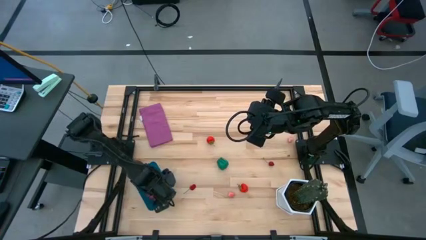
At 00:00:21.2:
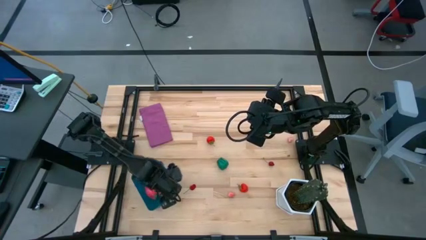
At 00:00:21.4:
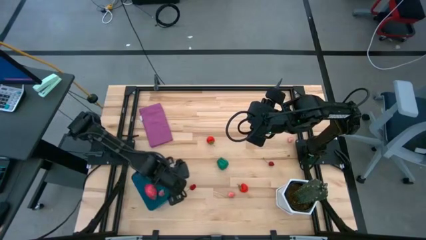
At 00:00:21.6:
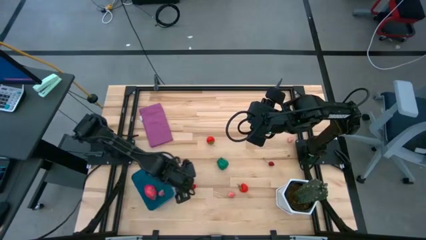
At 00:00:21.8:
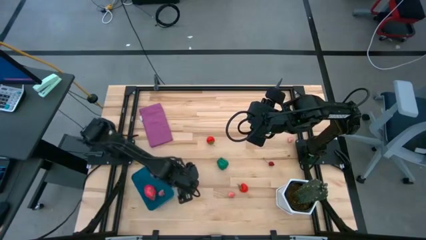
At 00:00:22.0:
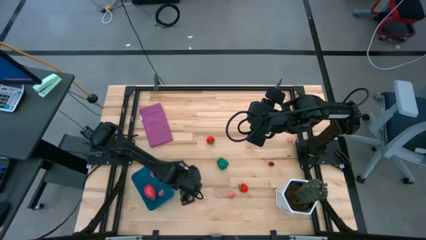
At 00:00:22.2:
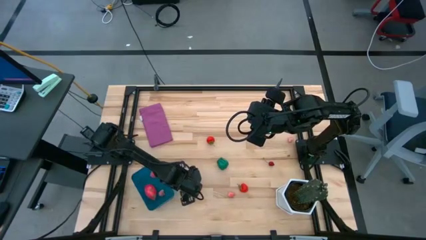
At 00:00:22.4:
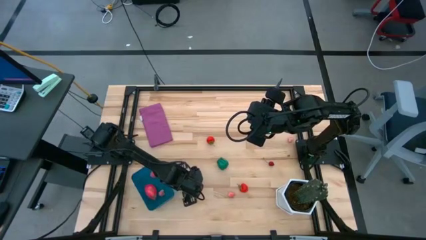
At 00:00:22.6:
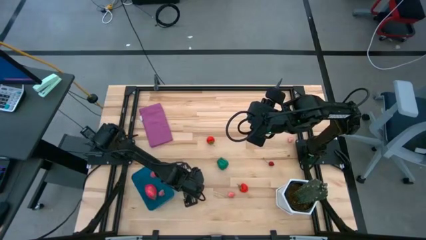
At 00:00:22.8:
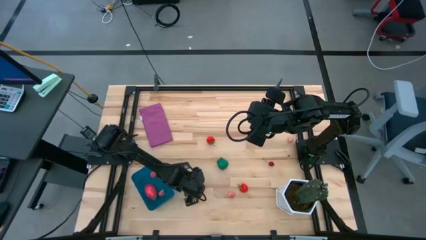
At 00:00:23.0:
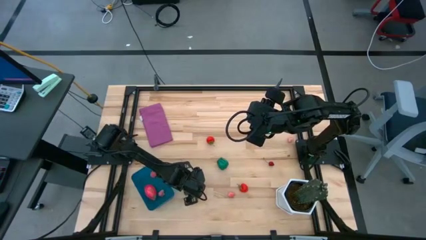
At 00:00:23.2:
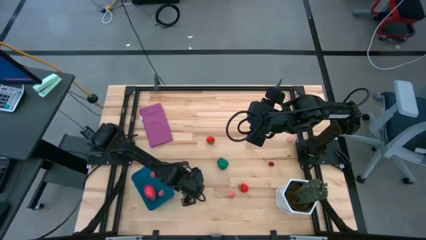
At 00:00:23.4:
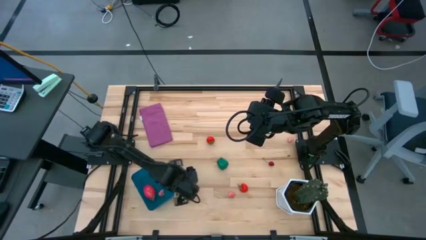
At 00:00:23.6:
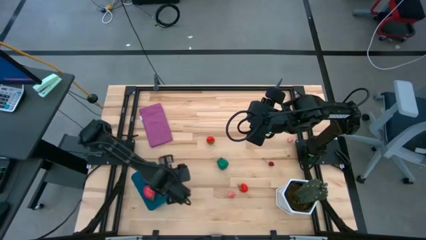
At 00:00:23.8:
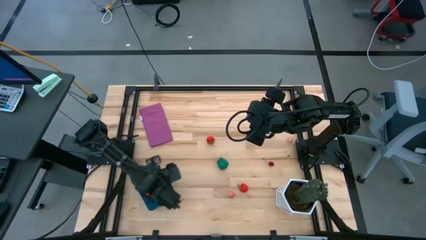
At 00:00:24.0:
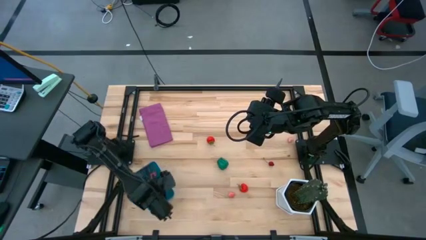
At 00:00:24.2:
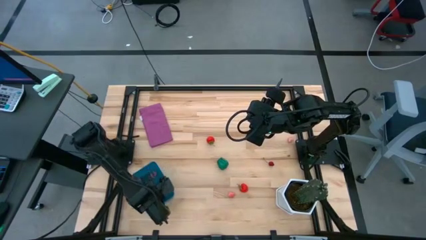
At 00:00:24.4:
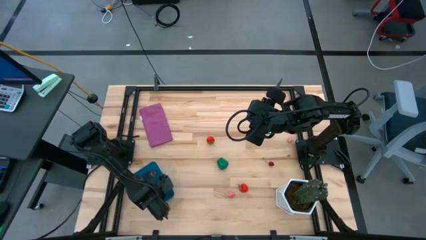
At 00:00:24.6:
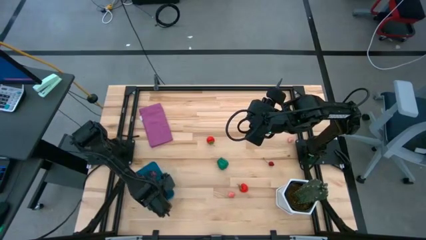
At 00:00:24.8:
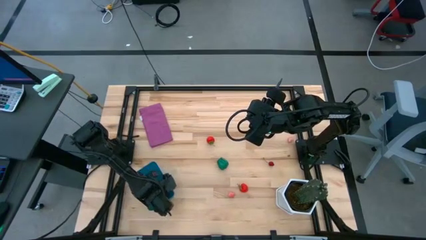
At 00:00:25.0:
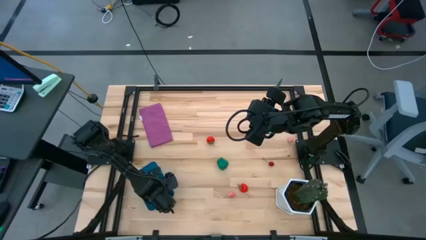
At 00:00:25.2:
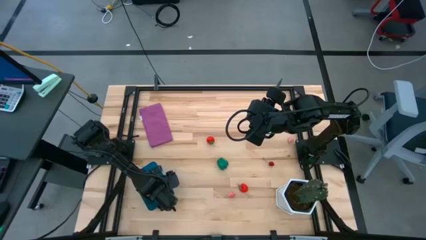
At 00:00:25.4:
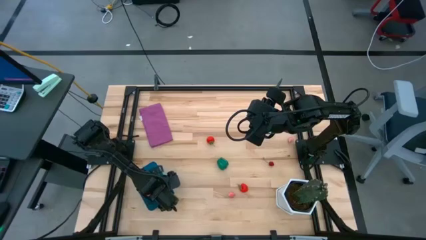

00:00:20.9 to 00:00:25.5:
Task: Pick and placing Produce into tupperware
Put the cherry into the blue bin

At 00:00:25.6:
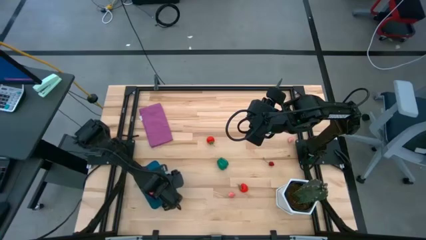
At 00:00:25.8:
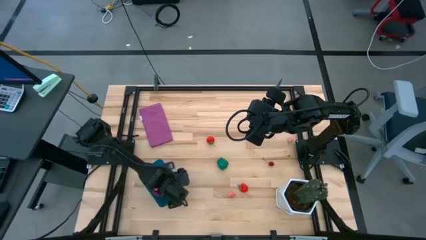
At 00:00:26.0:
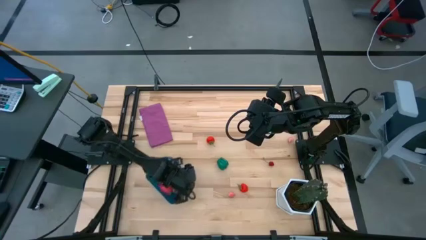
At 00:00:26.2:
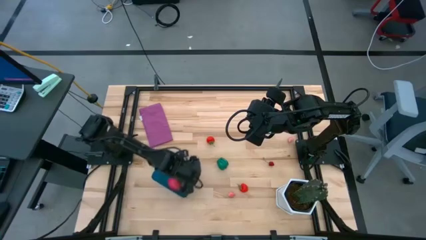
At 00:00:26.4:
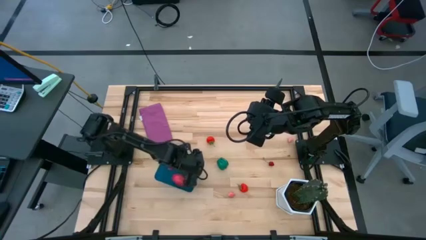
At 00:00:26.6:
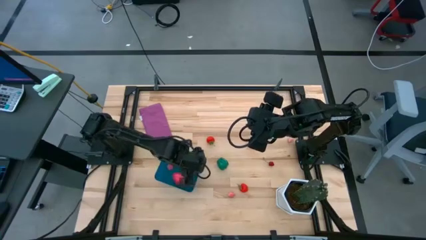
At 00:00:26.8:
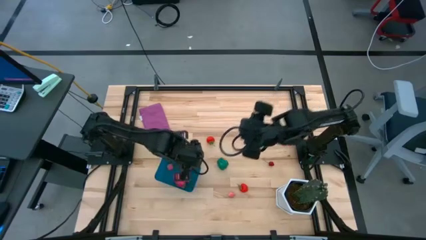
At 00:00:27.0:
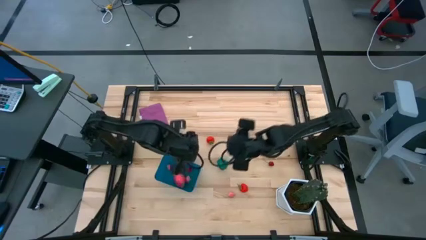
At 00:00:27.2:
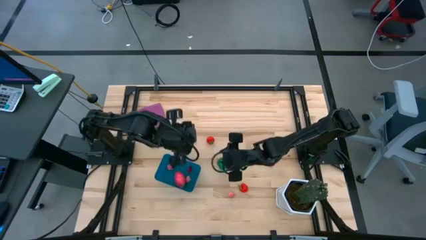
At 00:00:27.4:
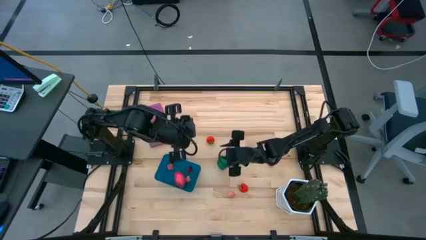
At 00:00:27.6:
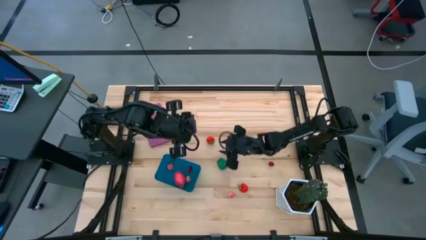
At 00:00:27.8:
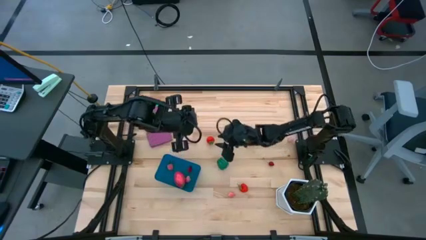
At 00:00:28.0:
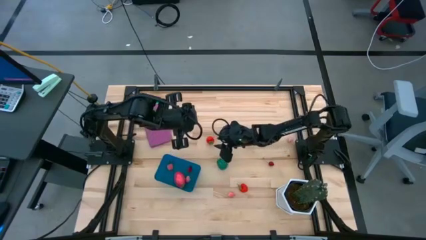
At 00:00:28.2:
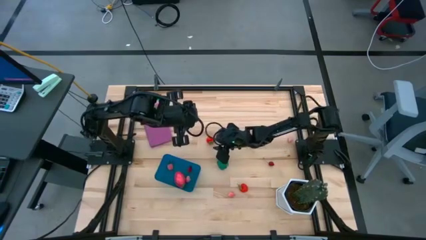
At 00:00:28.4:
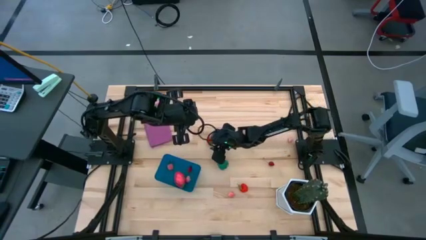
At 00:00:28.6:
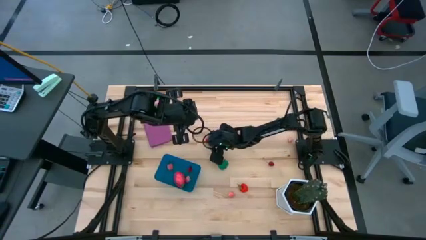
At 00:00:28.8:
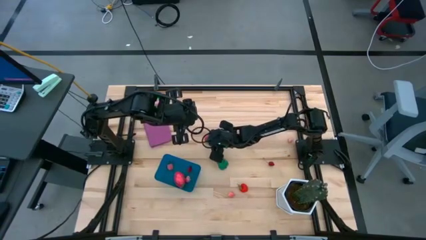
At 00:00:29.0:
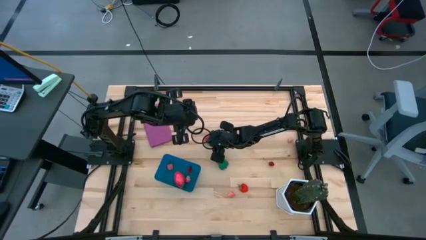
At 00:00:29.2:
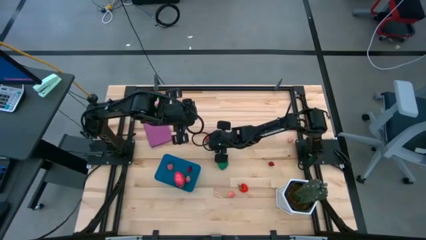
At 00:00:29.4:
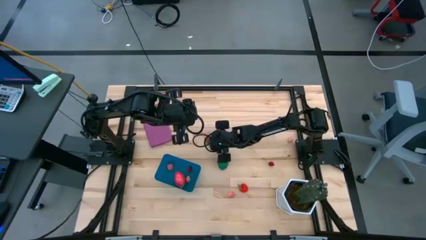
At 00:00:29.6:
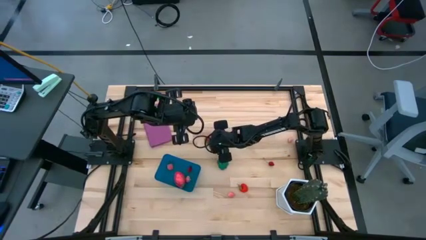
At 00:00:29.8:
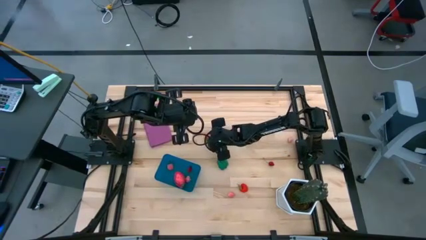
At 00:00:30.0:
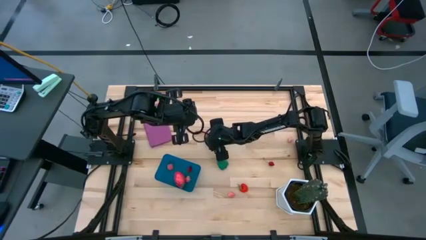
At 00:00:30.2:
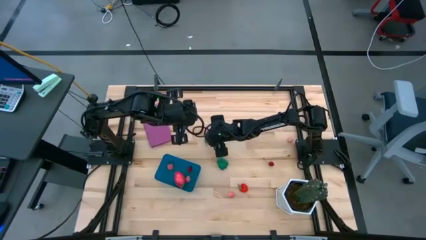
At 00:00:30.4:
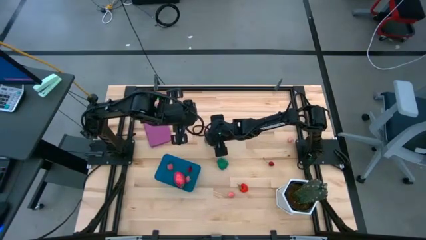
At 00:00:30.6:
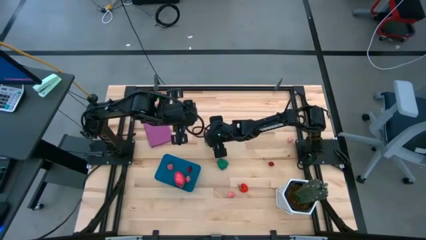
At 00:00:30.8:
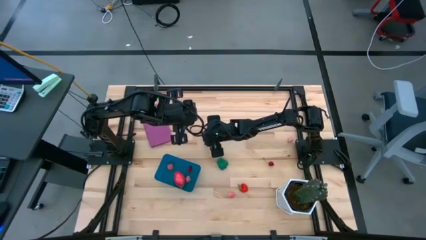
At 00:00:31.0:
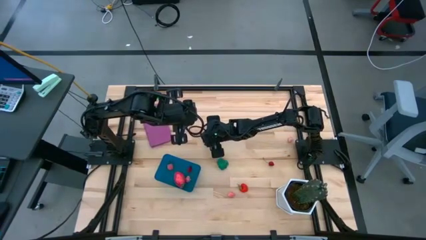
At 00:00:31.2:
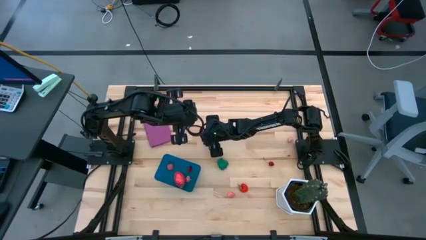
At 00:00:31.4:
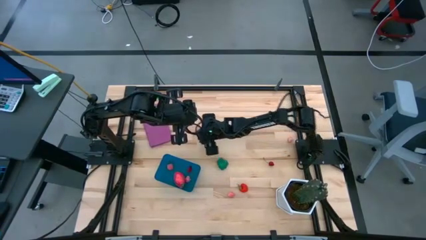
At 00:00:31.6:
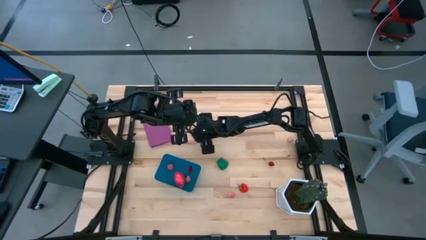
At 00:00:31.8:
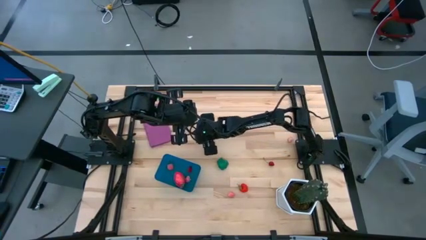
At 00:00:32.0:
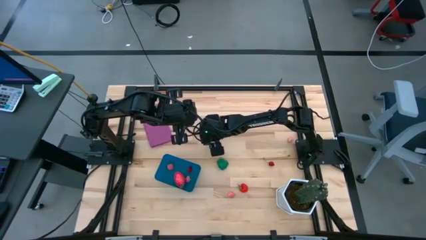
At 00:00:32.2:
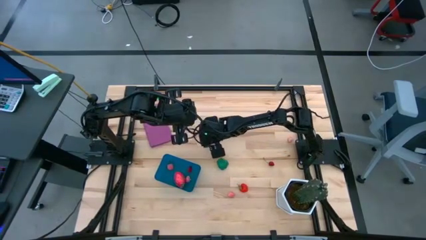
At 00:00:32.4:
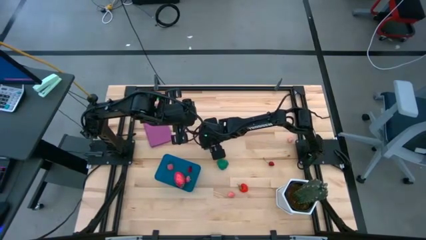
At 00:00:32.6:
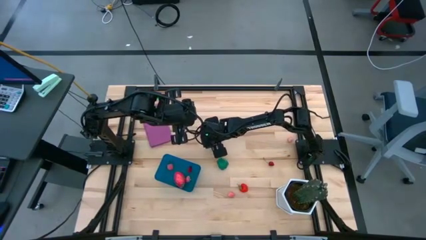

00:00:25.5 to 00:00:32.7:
Put the strawberry into the blue bin

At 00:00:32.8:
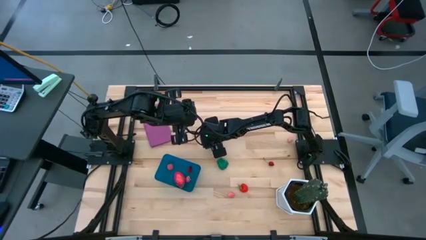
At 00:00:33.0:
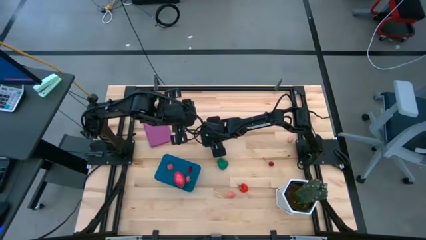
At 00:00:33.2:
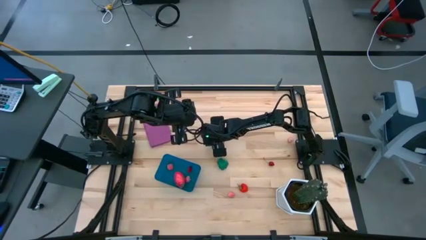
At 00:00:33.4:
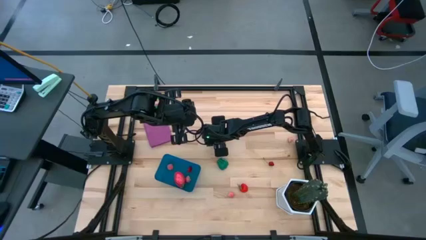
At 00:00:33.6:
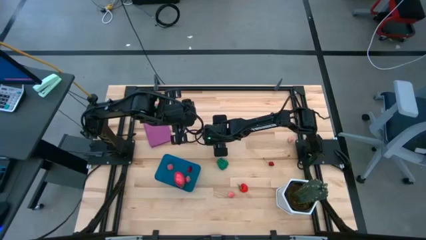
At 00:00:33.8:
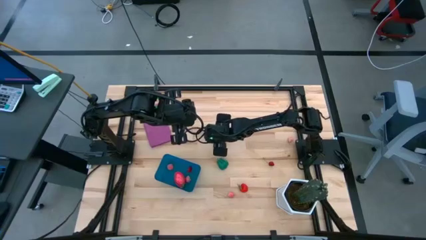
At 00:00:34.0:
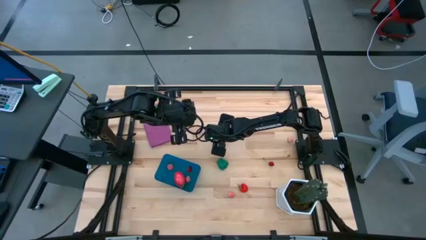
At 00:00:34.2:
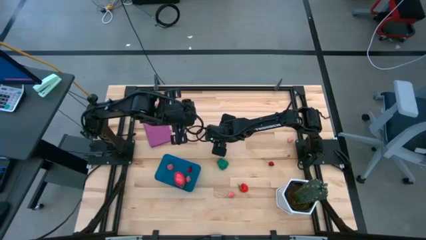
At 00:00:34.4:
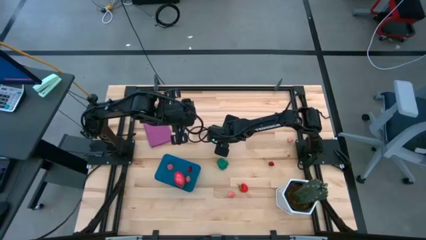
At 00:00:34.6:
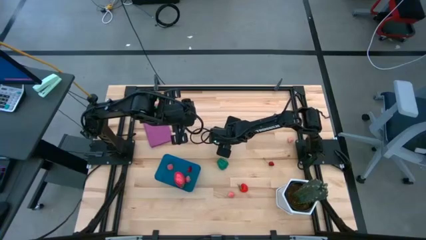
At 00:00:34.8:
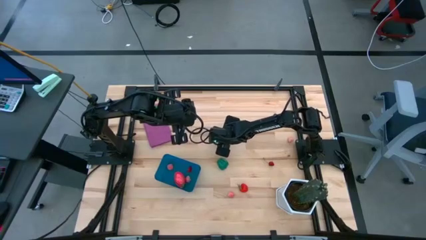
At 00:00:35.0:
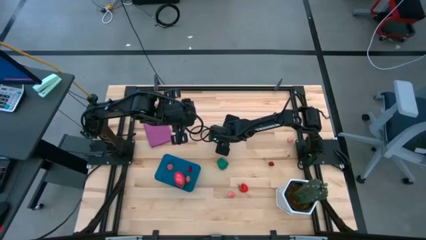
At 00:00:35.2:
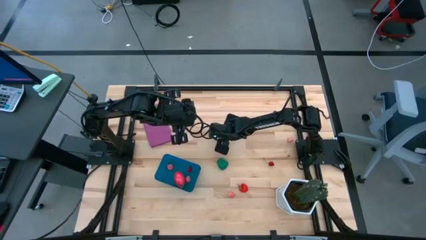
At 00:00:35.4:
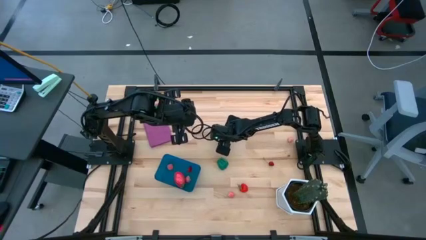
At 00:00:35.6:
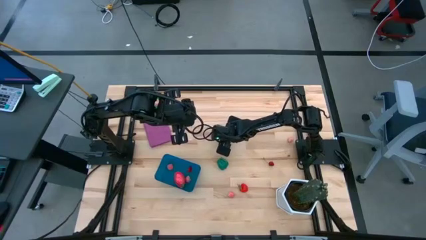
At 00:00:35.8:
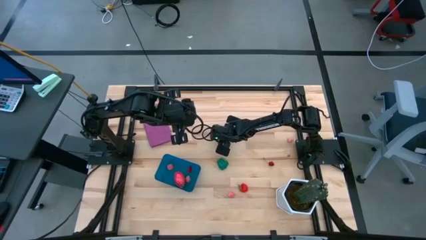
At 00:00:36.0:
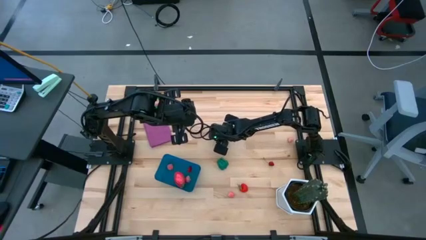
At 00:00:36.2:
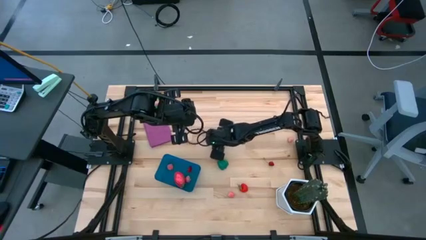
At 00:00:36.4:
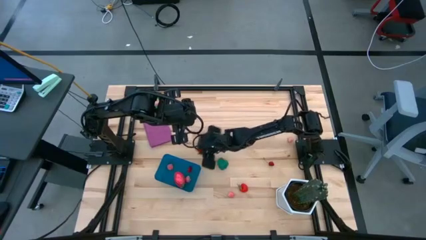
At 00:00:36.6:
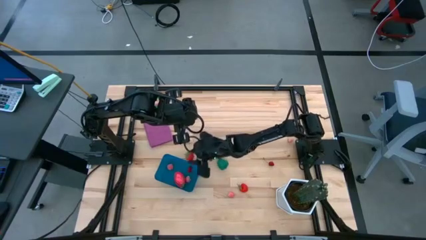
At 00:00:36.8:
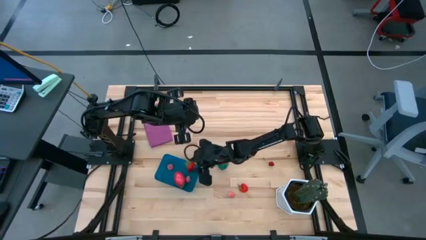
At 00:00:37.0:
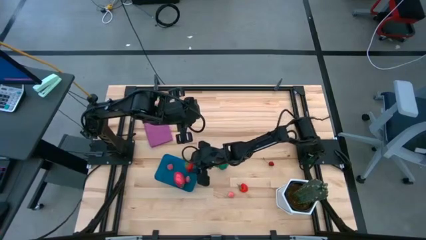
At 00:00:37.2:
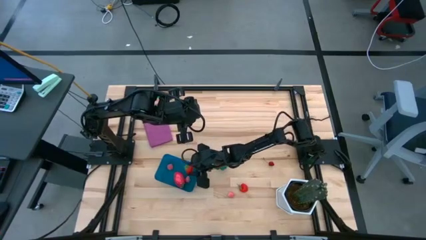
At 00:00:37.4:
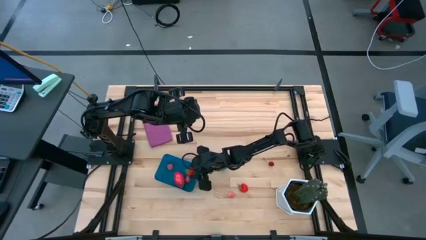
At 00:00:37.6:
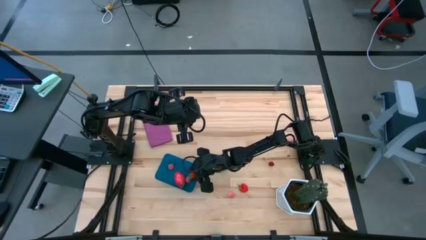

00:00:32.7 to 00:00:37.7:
Put the strawberry into the blue bin
